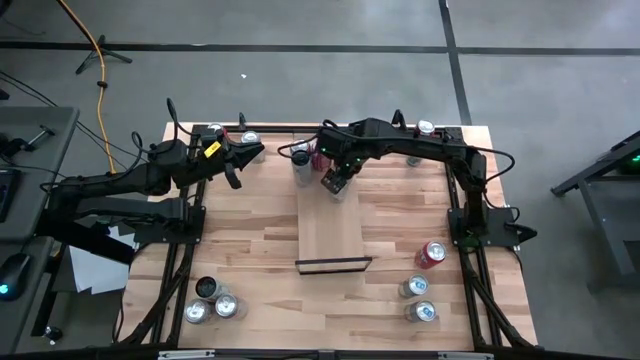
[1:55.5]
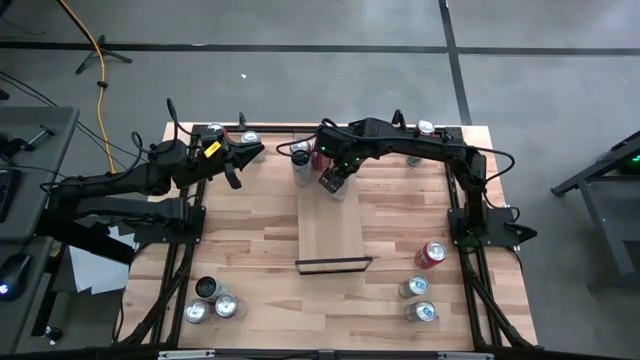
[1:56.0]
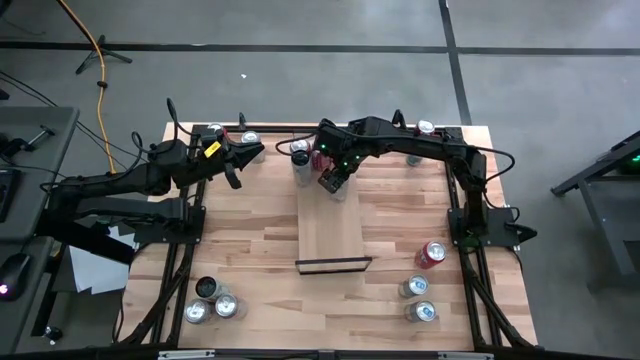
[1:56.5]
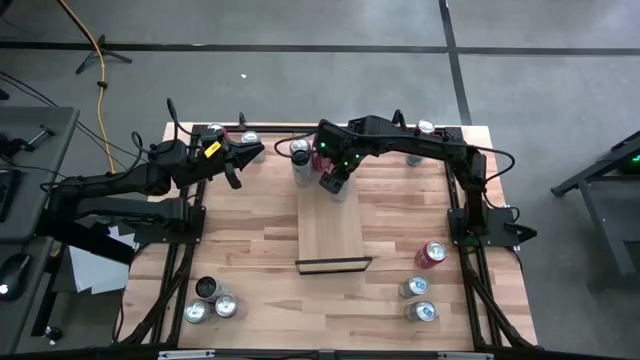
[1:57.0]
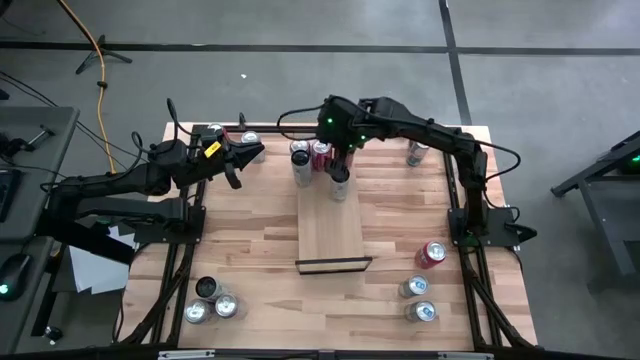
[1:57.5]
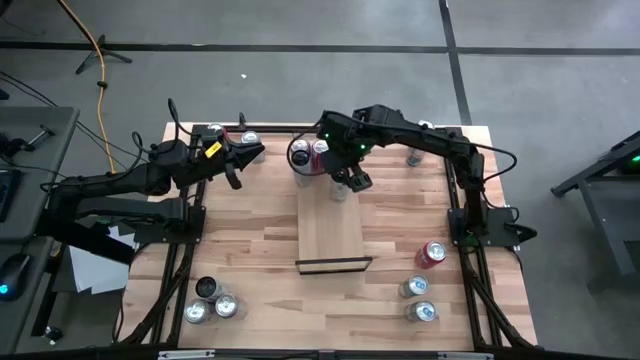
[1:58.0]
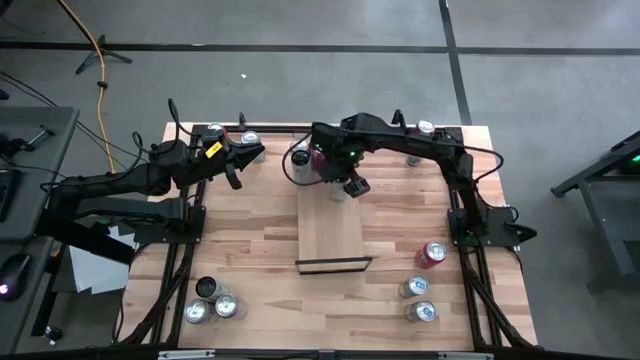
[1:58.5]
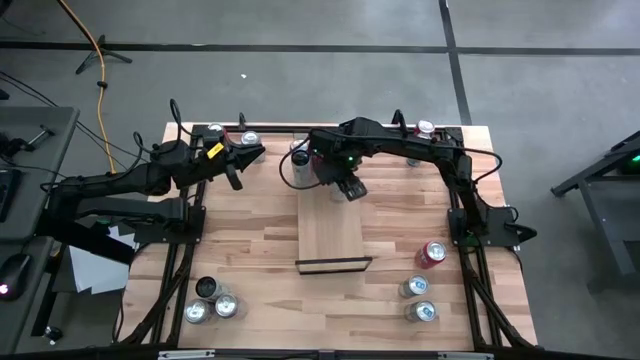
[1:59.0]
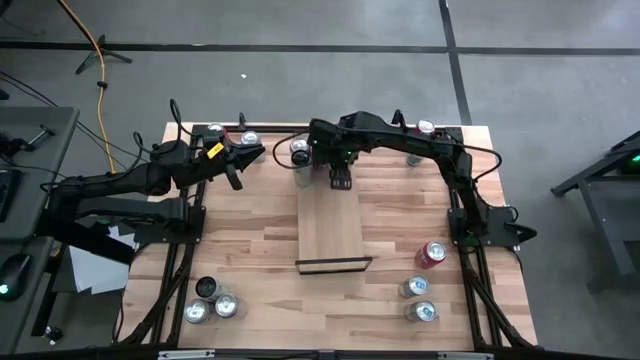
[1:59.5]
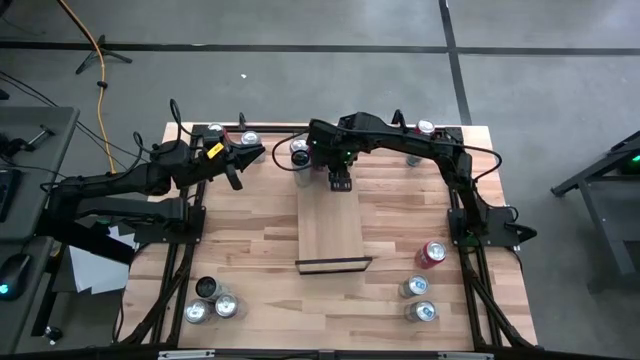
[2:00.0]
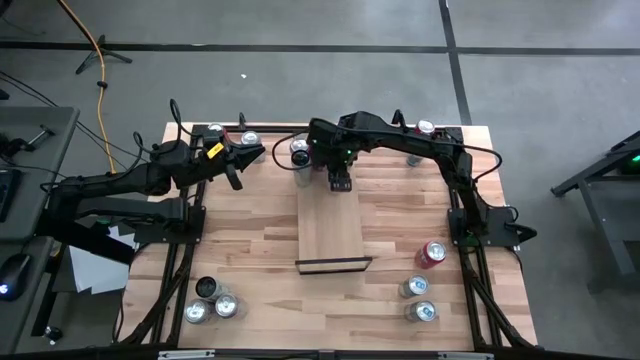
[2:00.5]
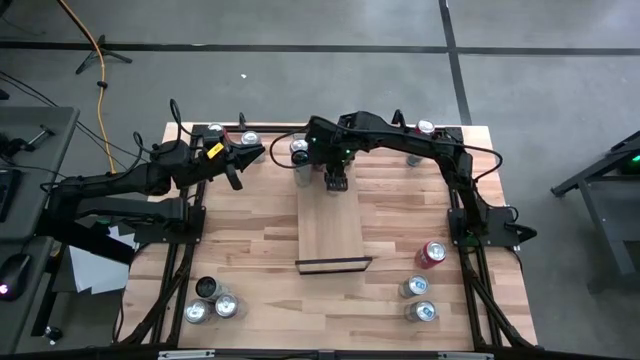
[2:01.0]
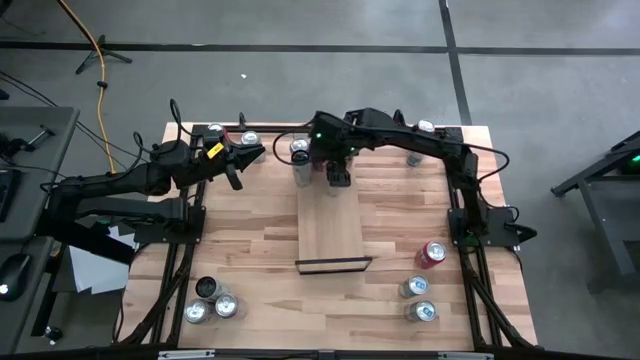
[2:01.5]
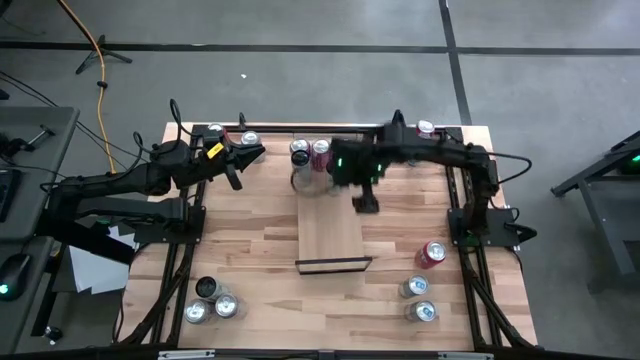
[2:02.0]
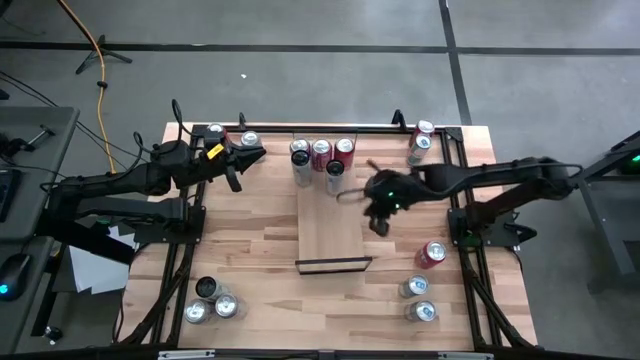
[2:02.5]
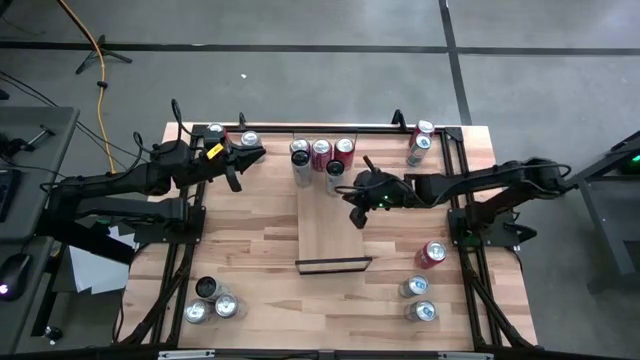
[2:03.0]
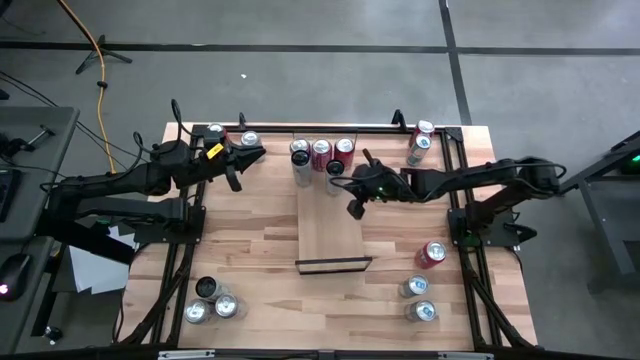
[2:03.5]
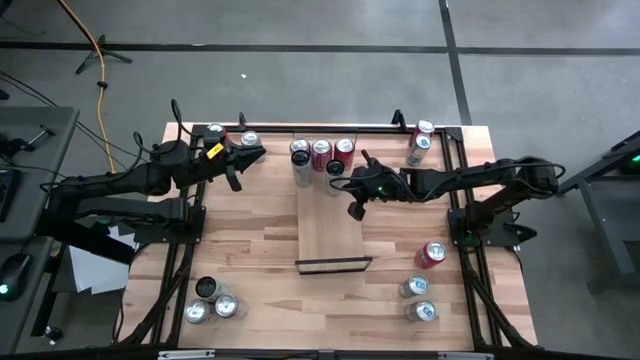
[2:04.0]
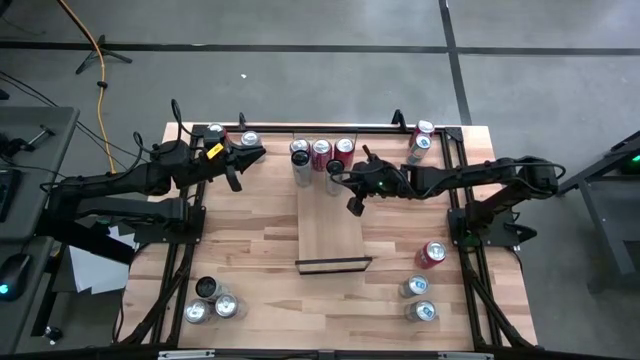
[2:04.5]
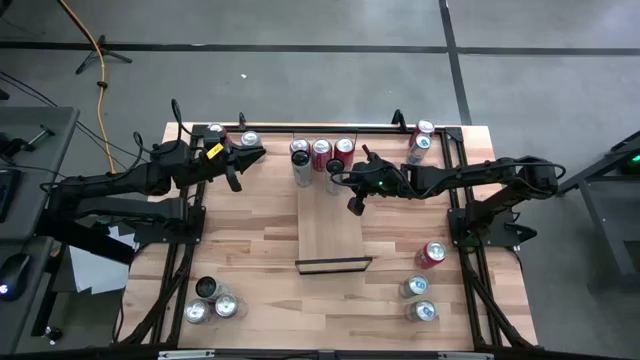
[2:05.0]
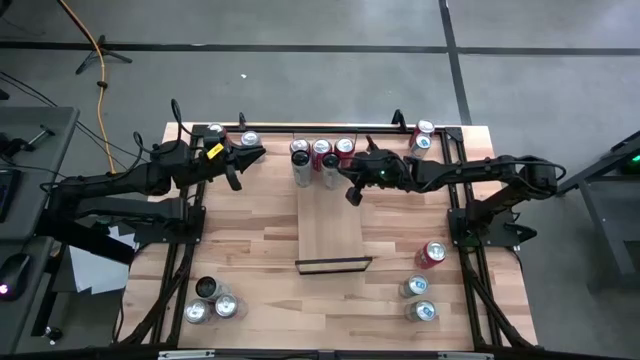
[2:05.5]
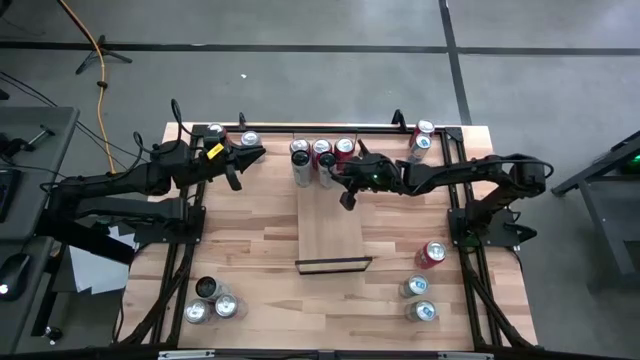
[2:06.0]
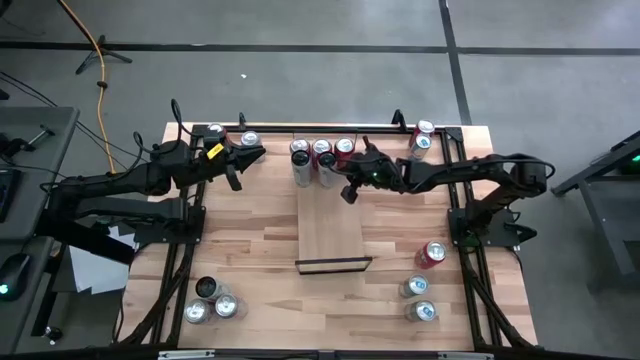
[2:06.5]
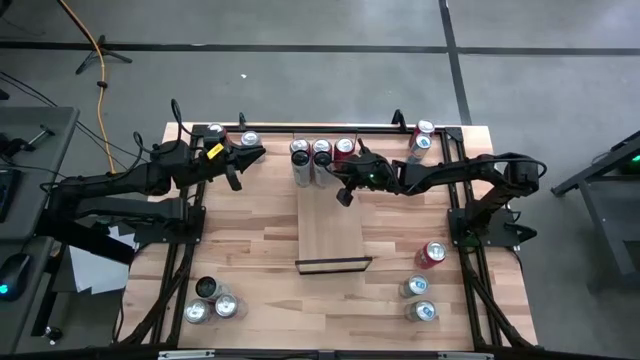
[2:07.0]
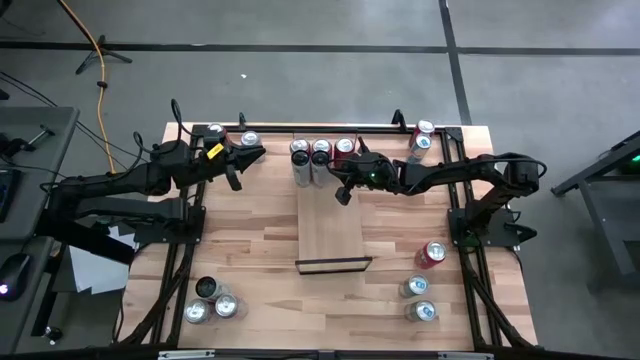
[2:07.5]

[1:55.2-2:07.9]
Task: Place canned beverage on shelf
Put the black soda can on the shelf aligned with the other black soda can

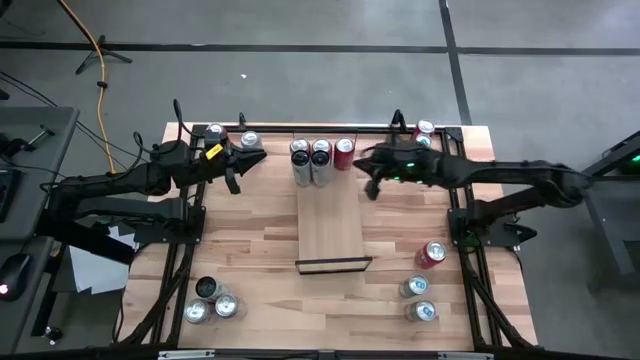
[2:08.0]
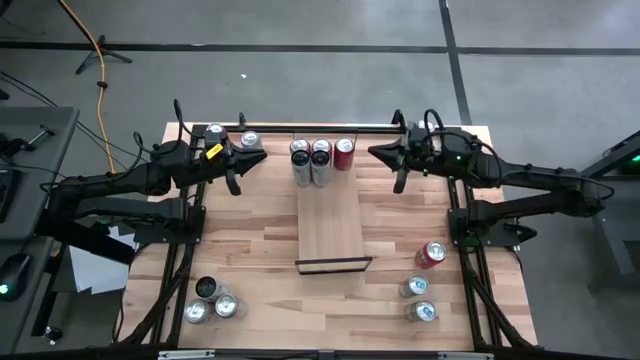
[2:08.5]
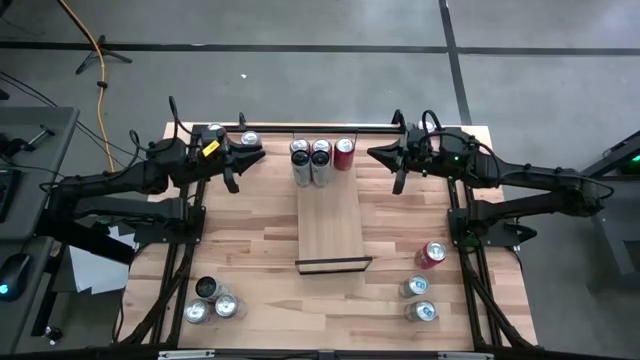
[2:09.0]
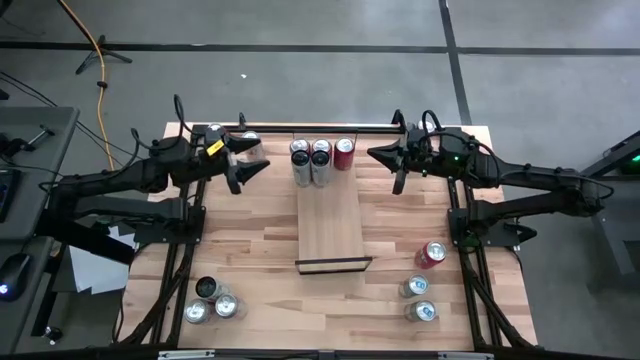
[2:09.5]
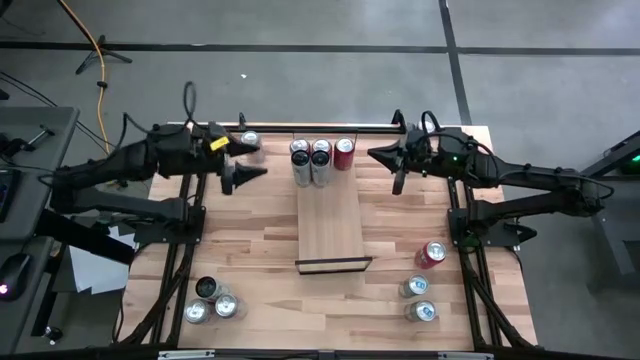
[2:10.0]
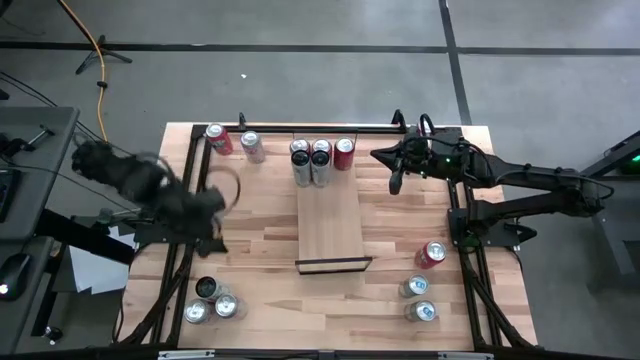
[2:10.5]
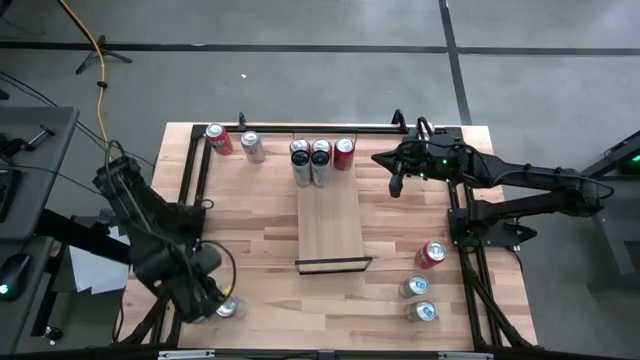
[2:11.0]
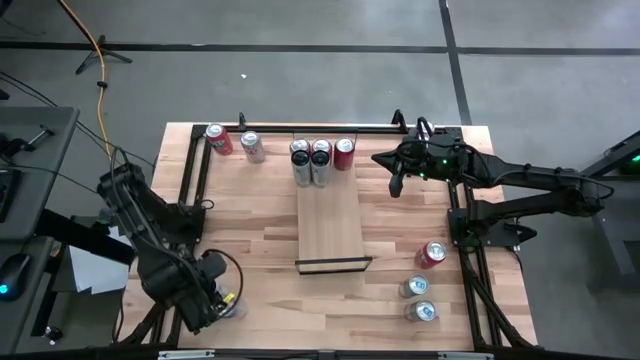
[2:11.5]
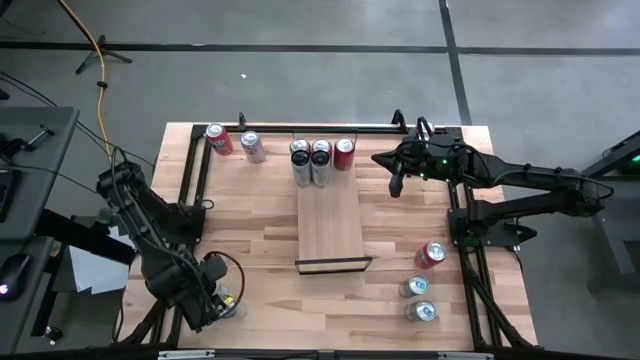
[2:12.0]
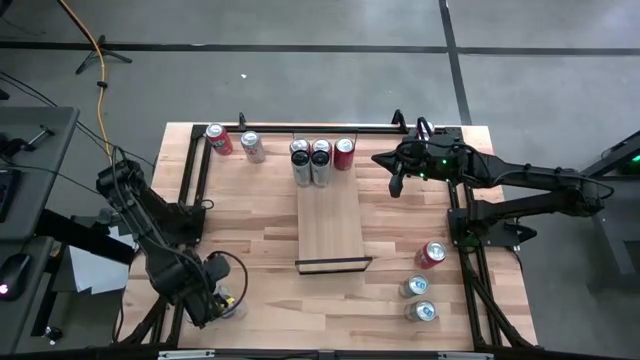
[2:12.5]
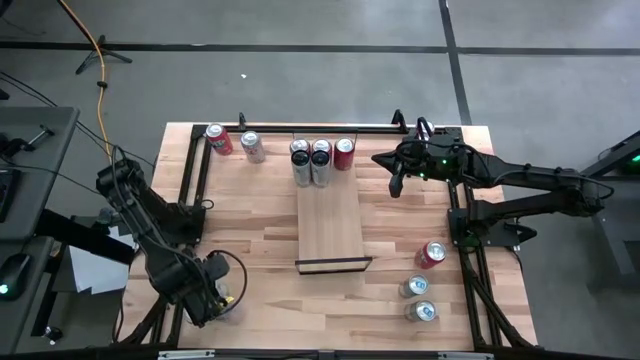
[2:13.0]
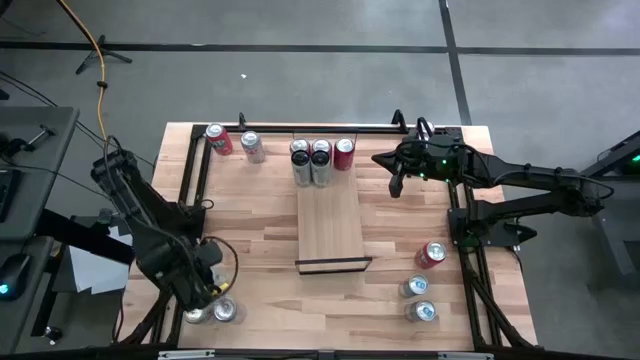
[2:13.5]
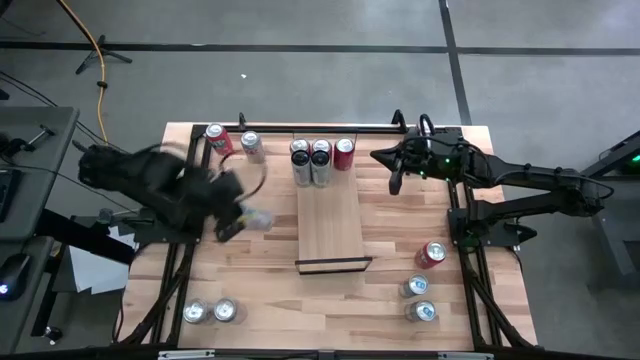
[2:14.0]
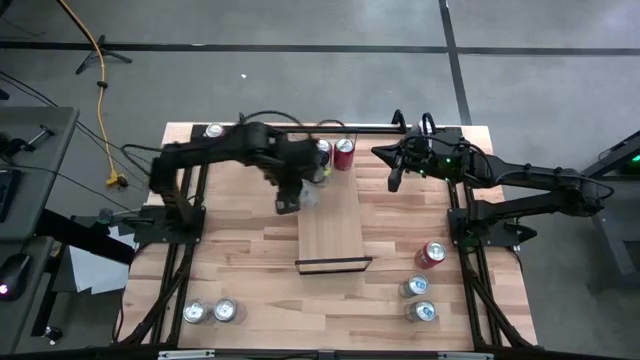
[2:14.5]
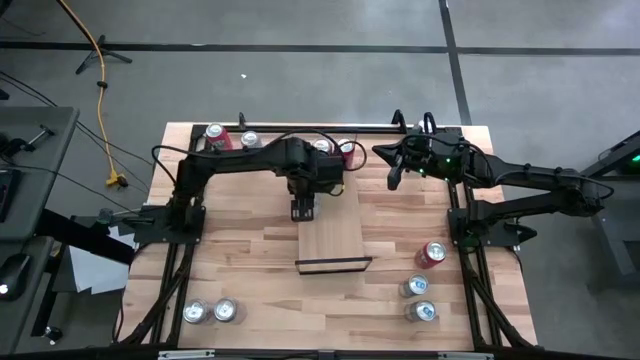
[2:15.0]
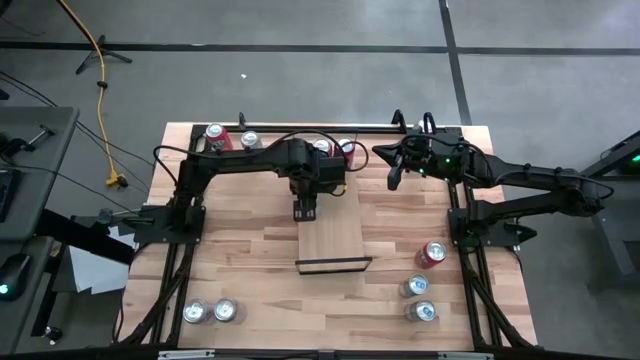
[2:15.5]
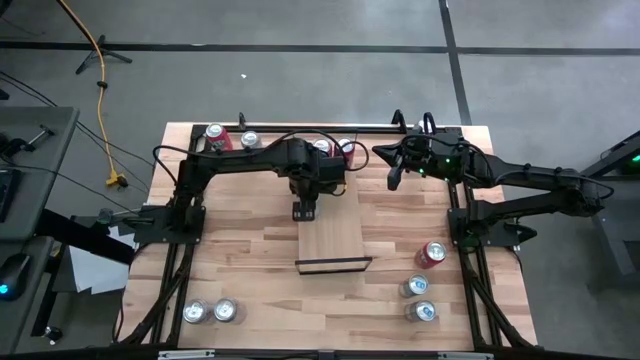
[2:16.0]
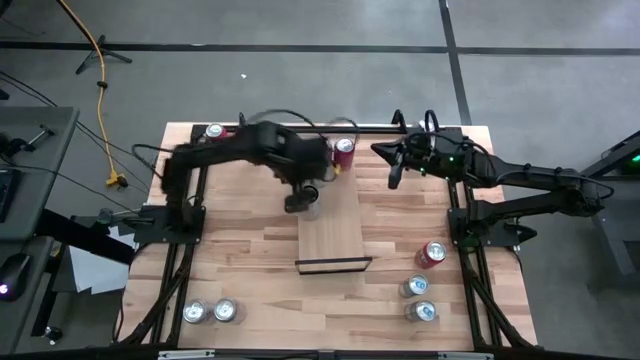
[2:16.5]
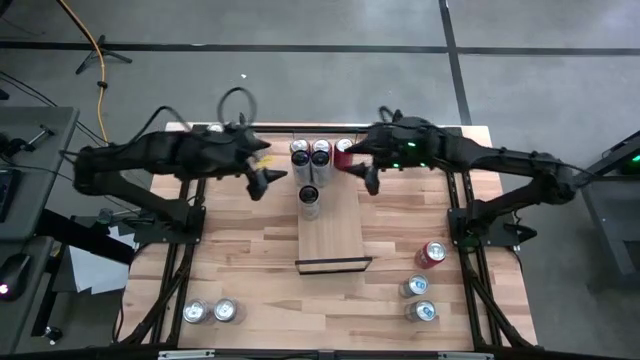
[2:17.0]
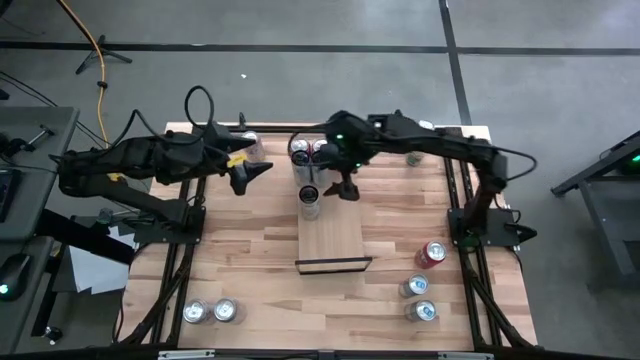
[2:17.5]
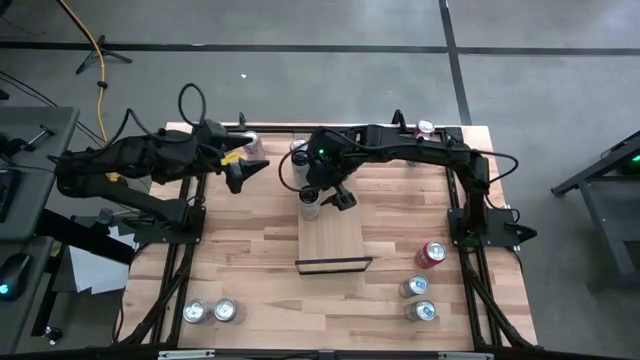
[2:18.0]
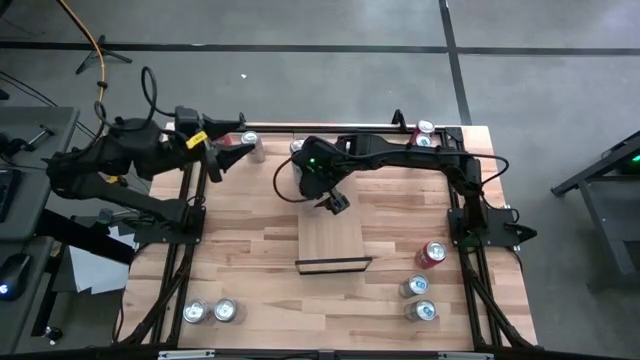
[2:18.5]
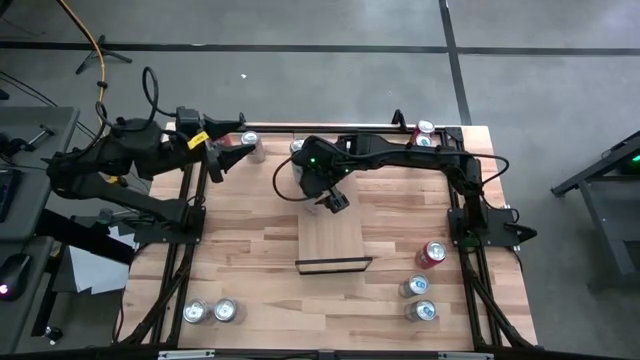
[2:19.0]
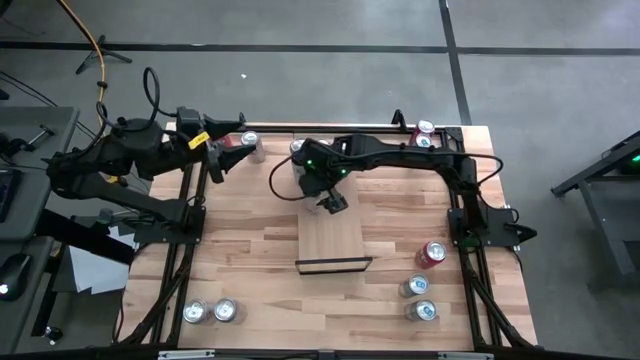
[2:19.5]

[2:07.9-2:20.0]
Put the black soda can on the shelf aligned with the other black soda can
